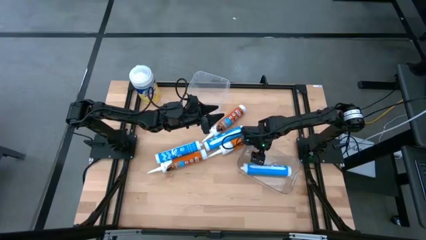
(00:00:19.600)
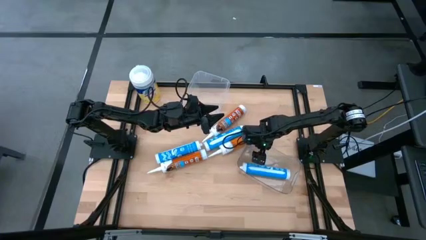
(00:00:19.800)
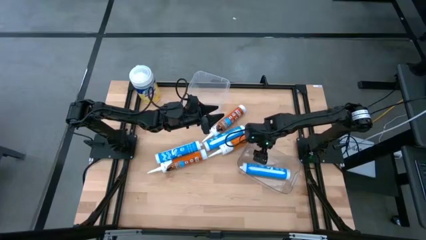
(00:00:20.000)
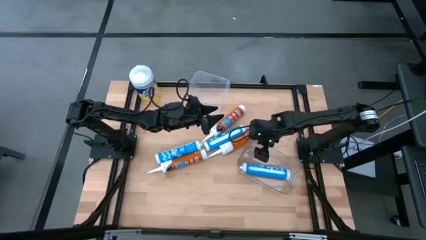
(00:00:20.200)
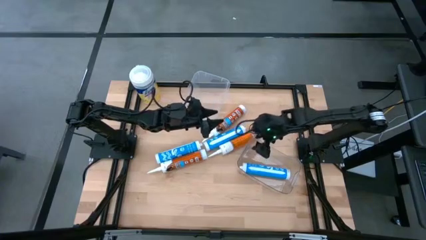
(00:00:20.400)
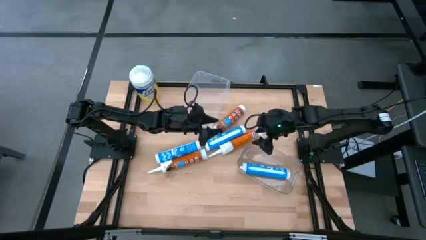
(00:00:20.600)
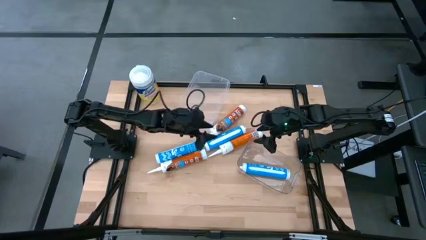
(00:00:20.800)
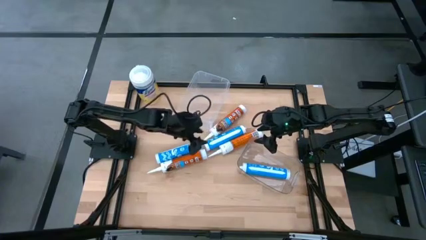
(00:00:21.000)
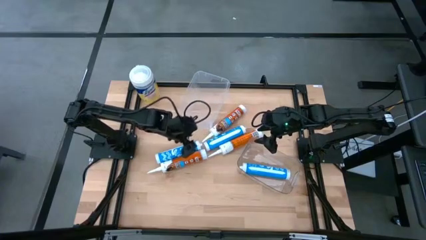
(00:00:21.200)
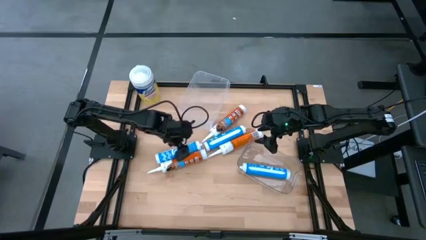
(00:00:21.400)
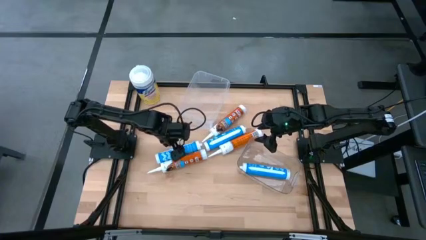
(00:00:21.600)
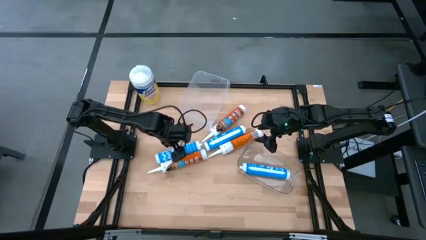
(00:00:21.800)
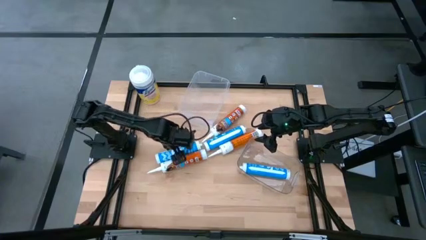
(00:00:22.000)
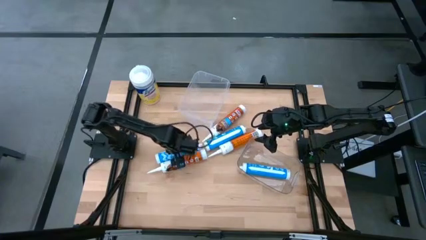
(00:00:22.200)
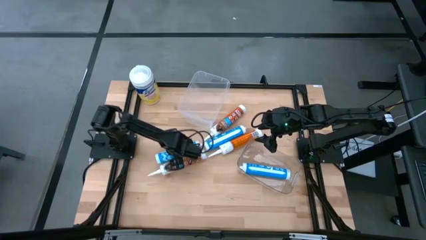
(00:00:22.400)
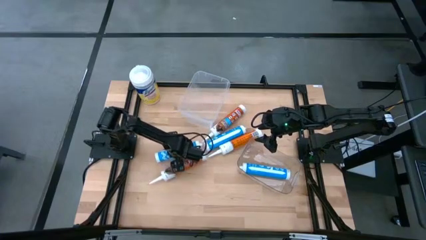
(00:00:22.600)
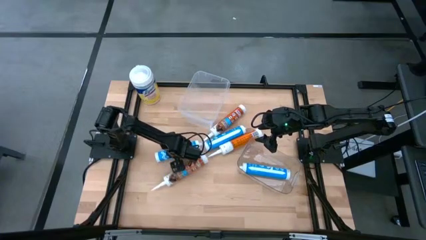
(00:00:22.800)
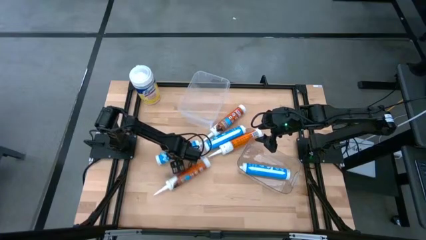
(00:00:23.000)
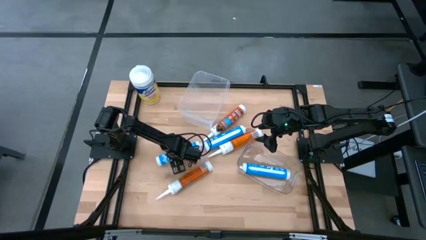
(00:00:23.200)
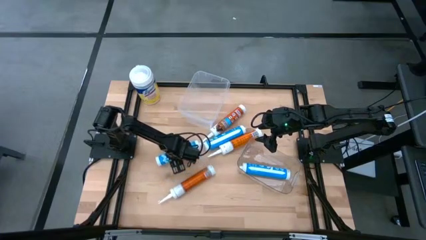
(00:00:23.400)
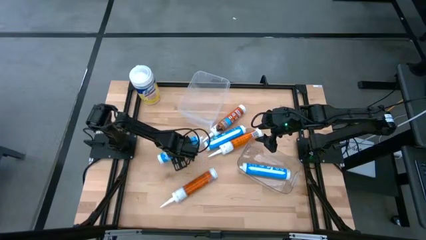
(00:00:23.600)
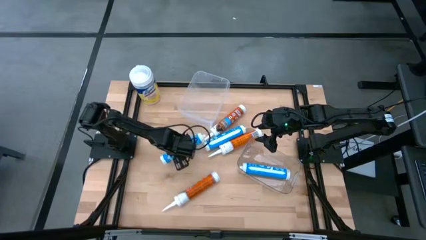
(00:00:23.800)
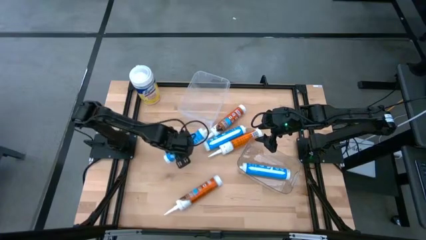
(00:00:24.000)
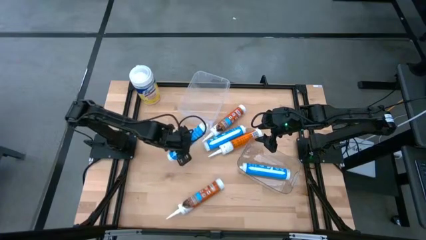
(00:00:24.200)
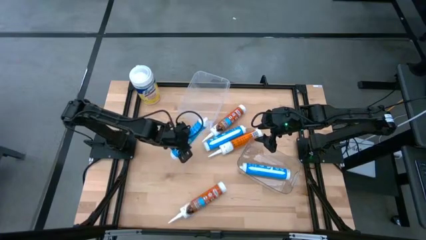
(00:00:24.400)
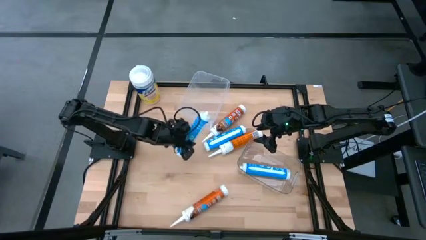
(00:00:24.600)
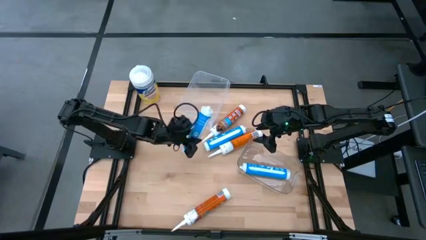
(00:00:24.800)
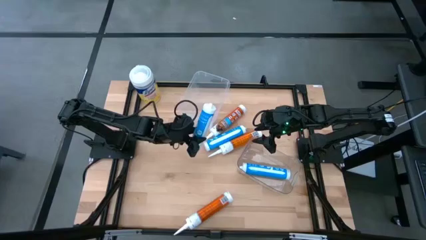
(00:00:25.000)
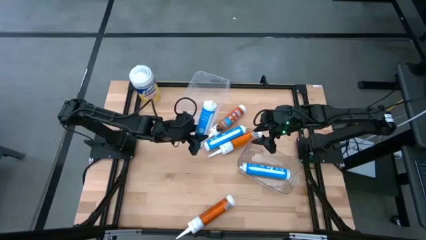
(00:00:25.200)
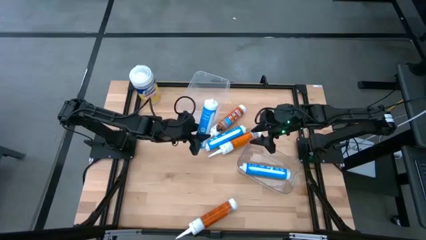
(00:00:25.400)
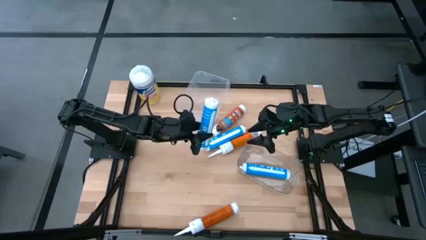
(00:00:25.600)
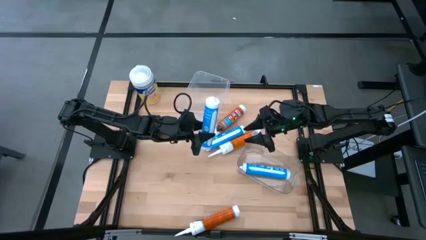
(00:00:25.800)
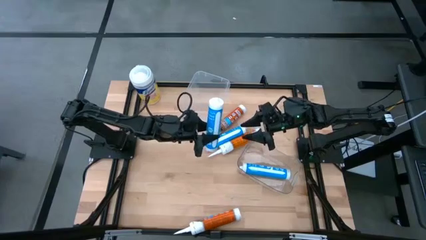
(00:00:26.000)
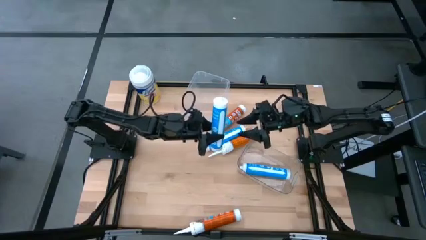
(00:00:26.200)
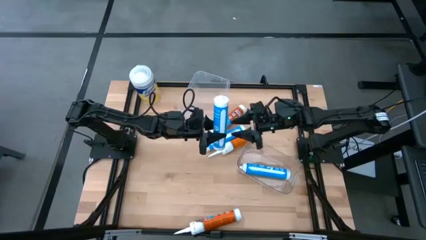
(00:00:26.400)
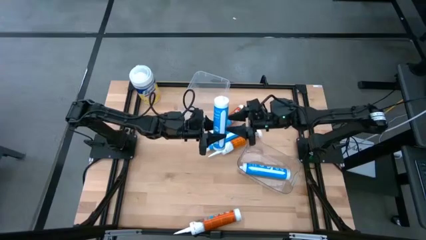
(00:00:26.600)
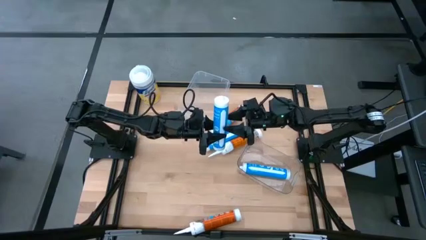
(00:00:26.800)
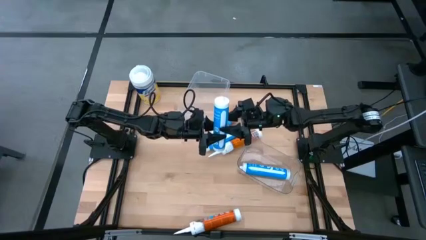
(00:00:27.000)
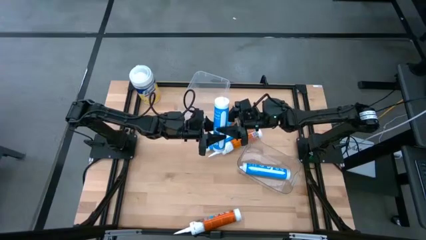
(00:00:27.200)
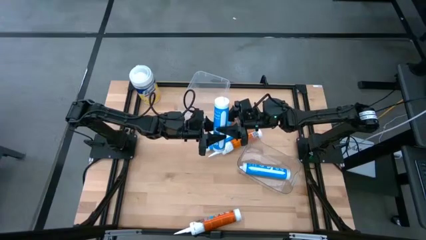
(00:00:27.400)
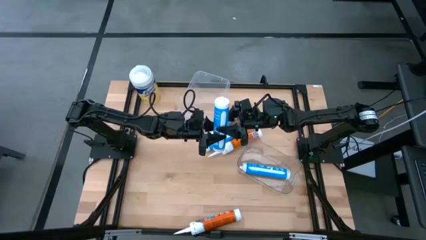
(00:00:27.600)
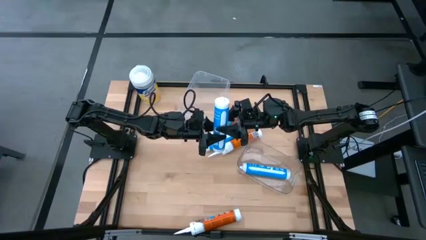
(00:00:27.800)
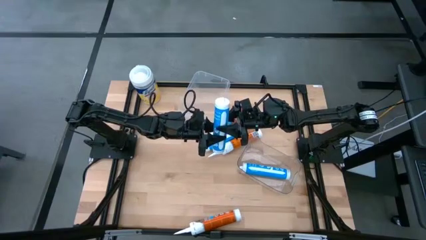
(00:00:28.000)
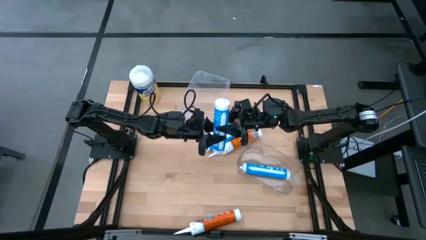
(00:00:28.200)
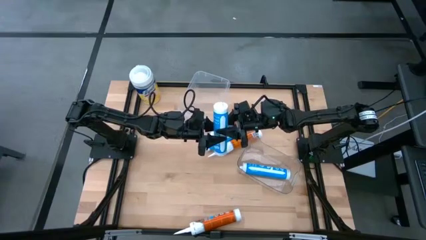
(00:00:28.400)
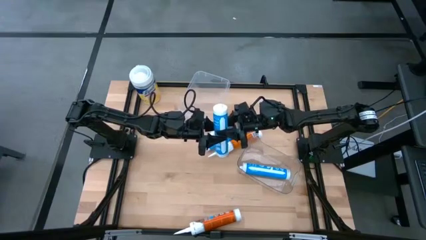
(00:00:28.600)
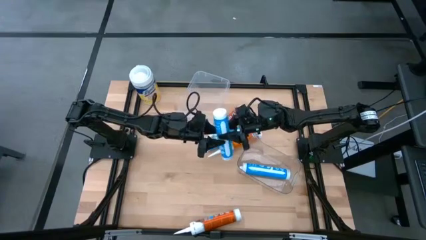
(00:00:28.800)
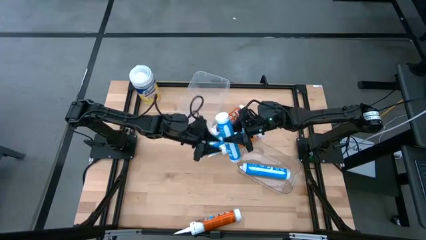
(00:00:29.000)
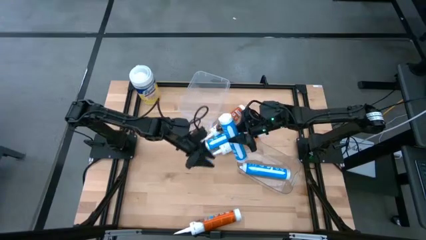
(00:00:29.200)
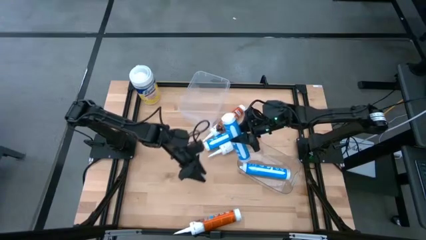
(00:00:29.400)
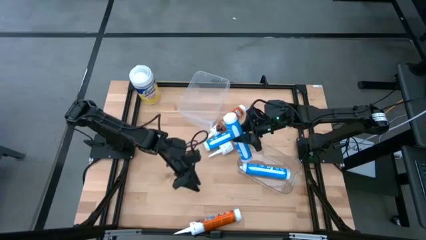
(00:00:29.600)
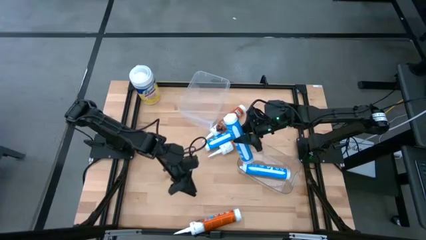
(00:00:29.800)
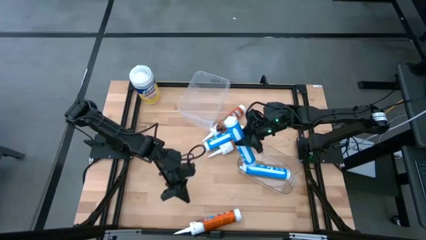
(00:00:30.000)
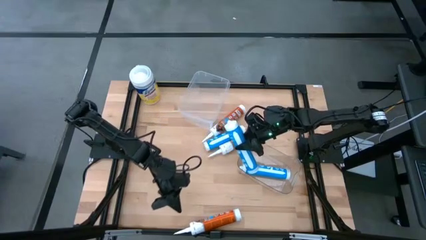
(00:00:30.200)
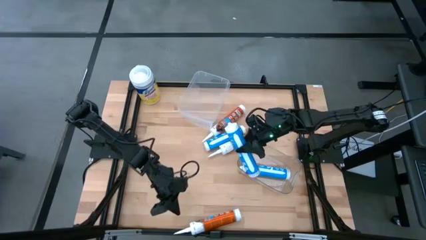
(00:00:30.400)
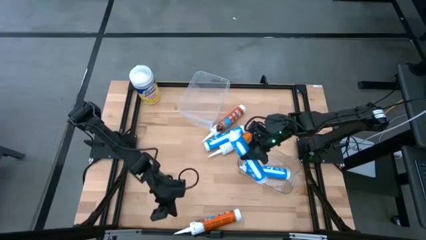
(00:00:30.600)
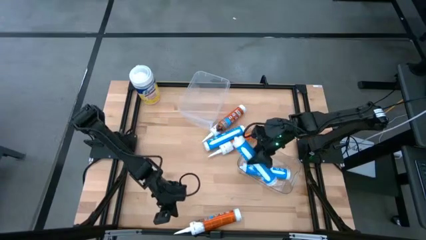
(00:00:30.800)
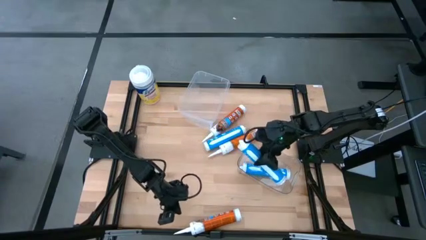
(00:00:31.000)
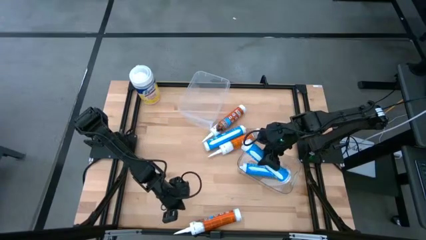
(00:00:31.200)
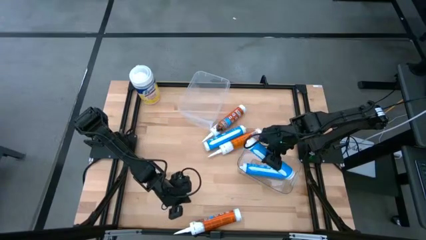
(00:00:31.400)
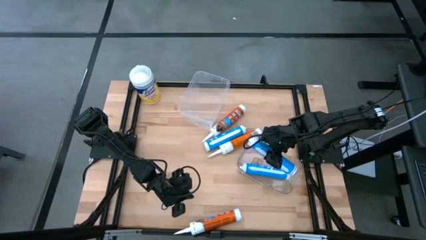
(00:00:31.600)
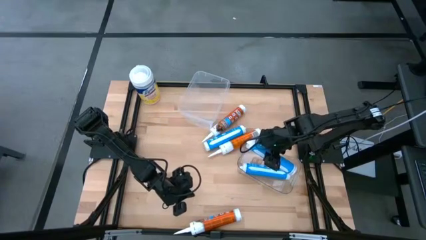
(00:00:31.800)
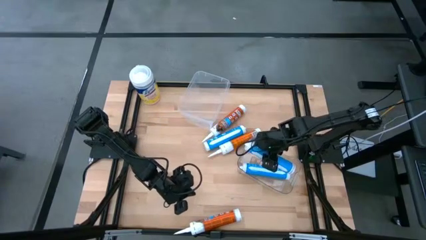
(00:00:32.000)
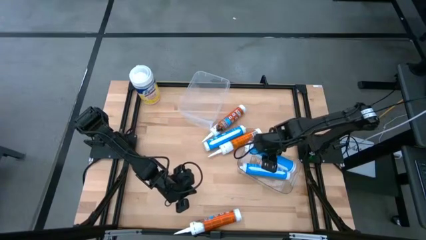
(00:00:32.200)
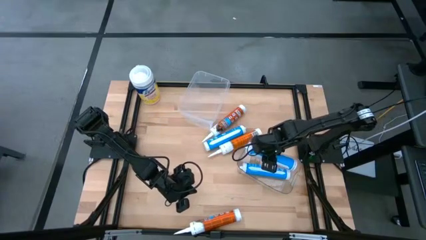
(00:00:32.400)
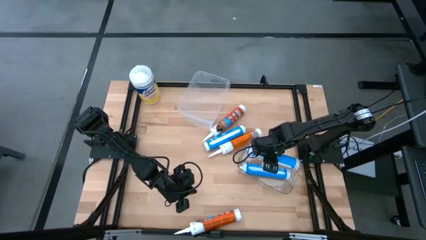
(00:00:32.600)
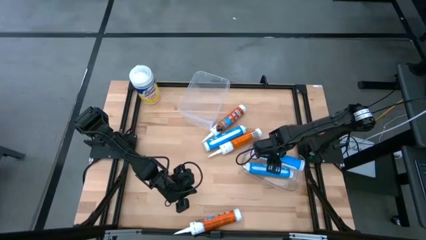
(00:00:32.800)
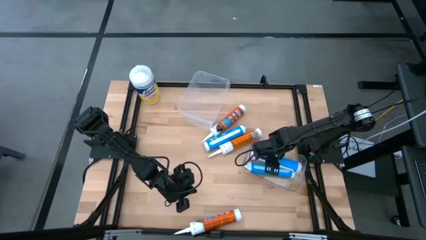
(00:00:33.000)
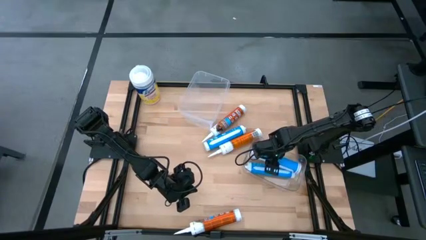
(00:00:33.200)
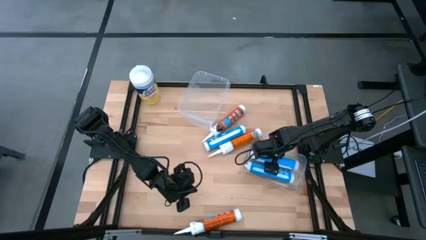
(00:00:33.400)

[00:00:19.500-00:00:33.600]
Task: Pick & place silicon tubes, Sealant and Lysol wipes
Put the left blue sealant into the transparent bin

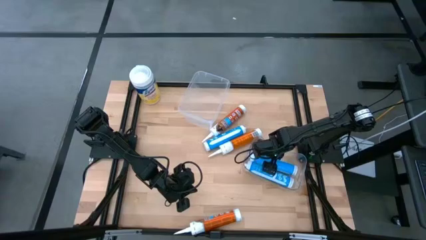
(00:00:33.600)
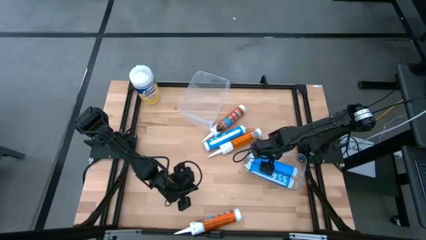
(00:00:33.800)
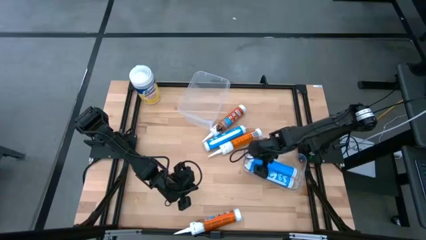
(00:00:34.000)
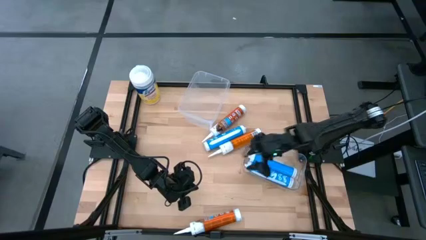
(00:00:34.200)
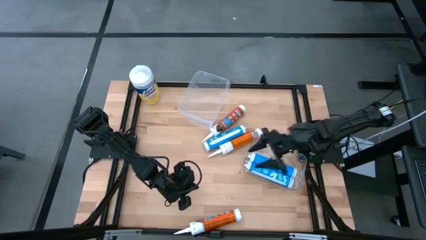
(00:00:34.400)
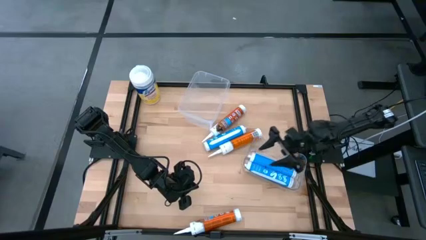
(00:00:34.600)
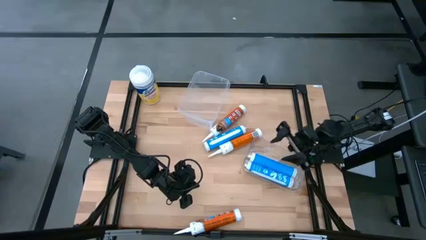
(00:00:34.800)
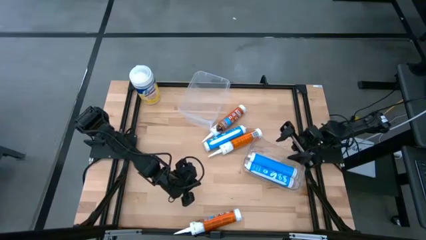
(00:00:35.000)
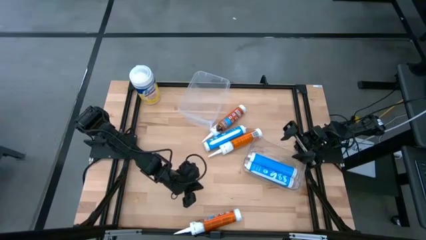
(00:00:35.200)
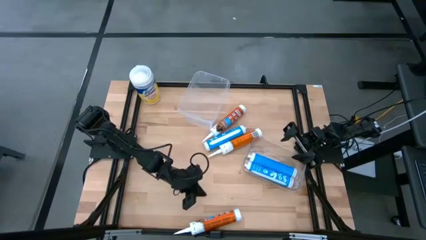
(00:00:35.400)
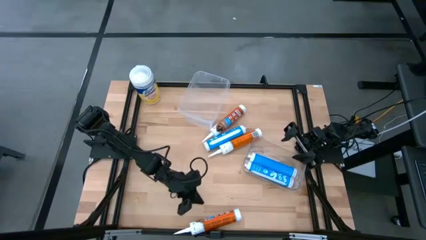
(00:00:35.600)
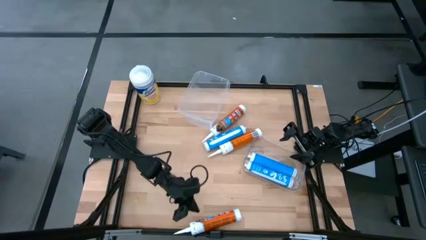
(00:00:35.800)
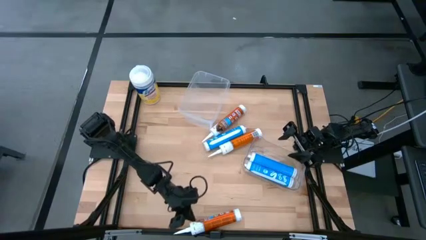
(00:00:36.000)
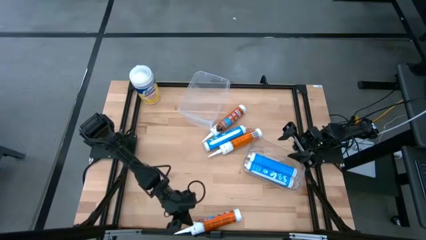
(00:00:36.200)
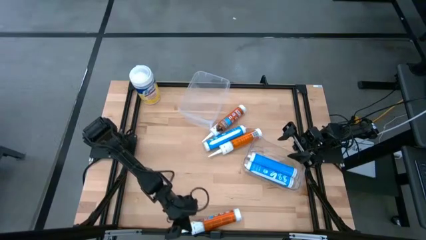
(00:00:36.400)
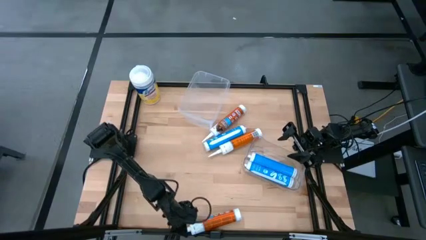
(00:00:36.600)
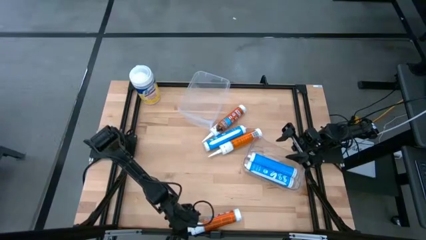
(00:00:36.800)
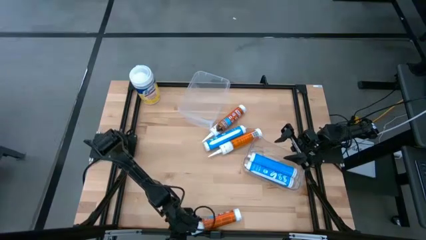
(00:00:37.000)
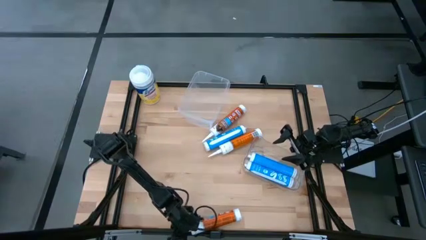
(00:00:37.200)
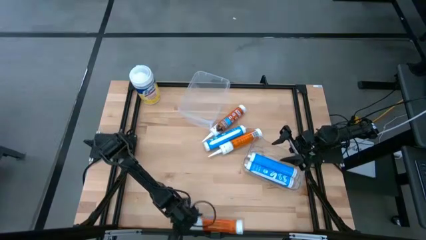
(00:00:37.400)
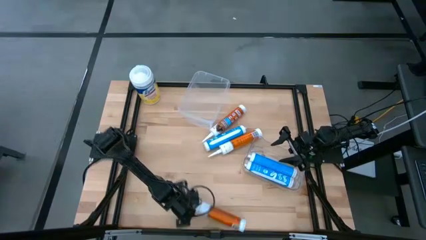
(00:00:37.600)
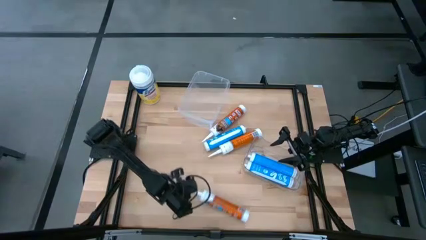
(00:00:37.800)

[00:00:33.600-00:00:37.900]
Move the orange sealant to the center of the table
